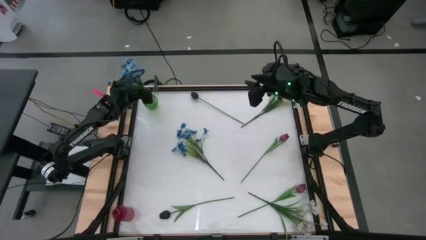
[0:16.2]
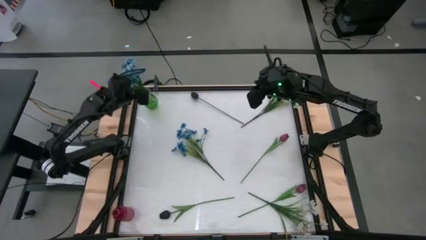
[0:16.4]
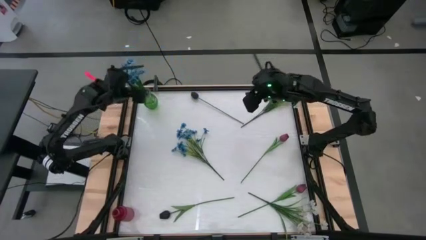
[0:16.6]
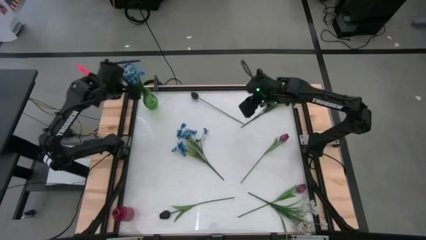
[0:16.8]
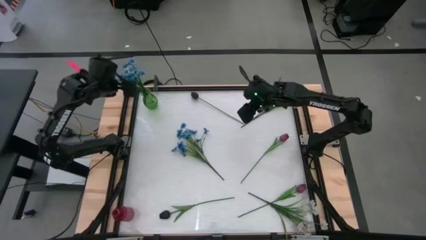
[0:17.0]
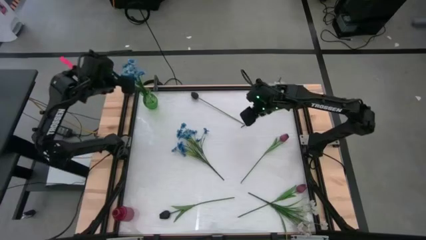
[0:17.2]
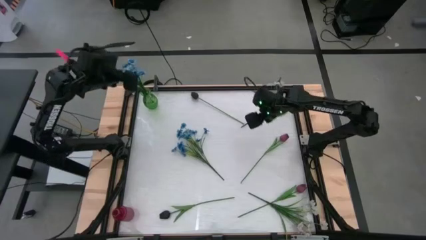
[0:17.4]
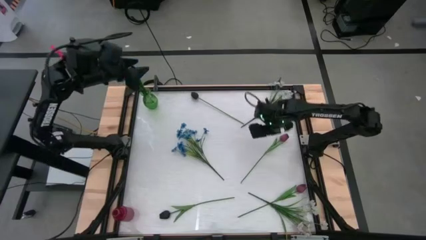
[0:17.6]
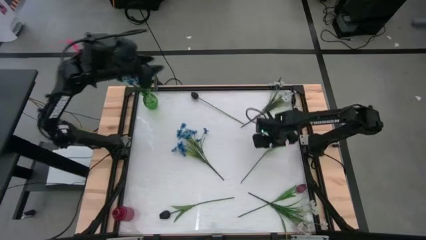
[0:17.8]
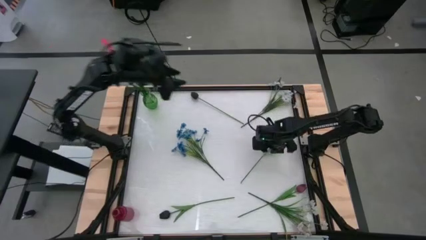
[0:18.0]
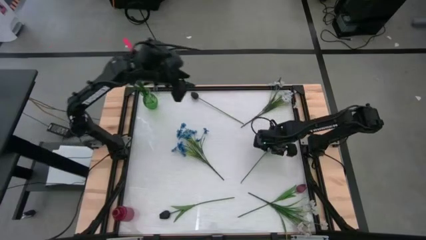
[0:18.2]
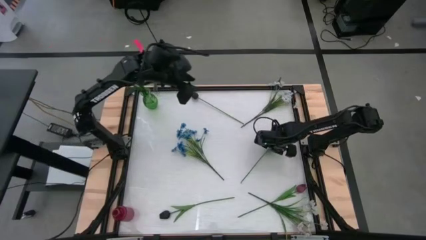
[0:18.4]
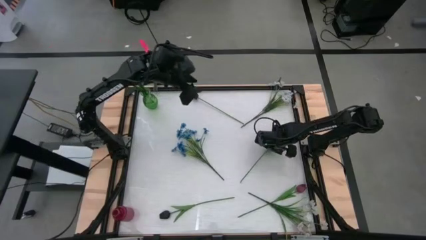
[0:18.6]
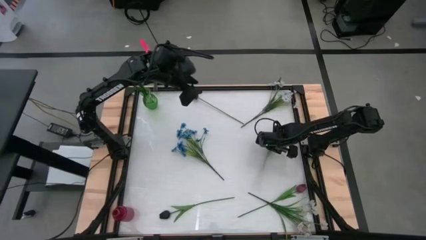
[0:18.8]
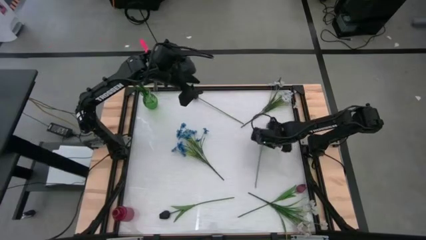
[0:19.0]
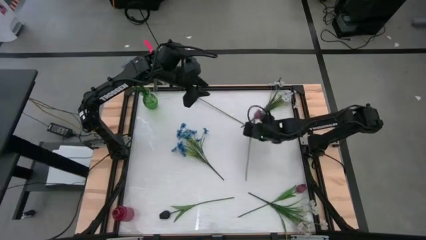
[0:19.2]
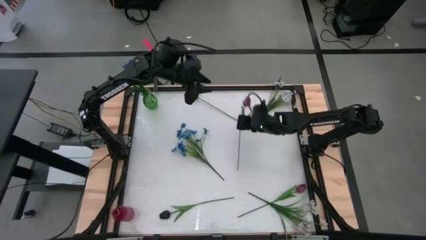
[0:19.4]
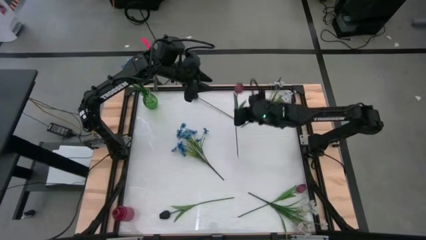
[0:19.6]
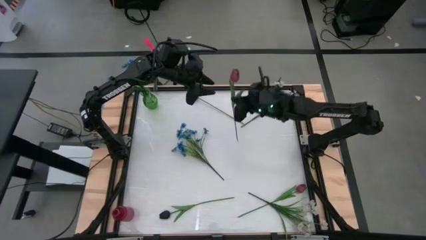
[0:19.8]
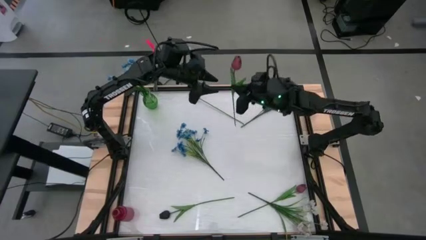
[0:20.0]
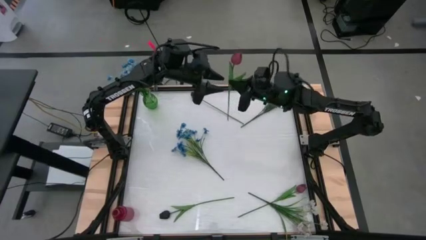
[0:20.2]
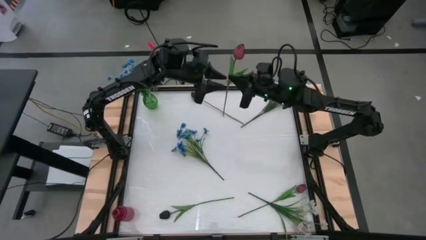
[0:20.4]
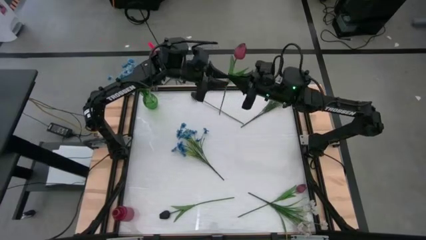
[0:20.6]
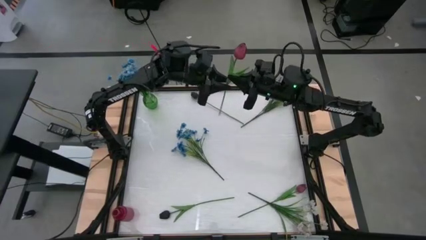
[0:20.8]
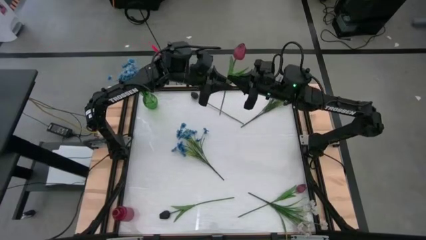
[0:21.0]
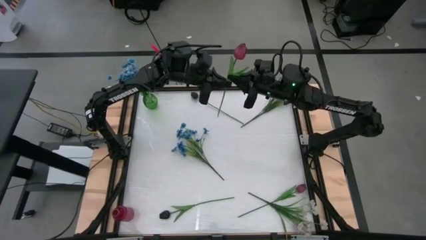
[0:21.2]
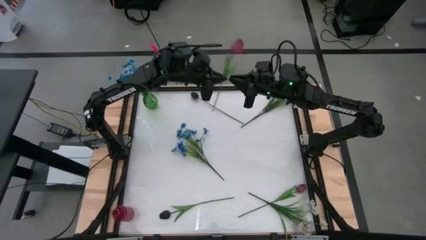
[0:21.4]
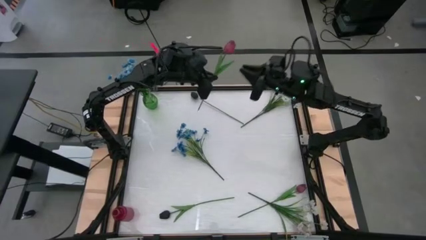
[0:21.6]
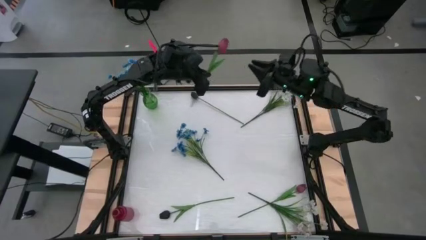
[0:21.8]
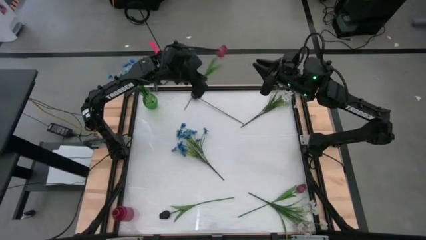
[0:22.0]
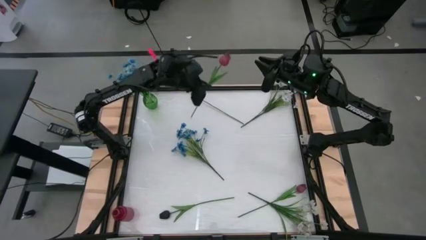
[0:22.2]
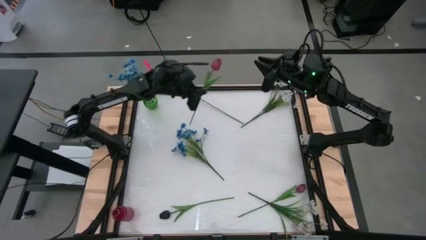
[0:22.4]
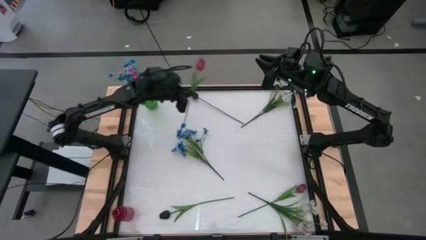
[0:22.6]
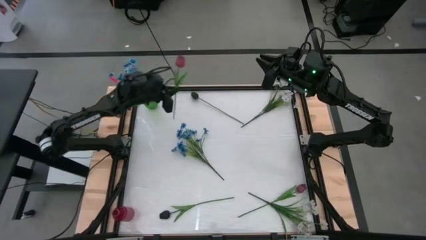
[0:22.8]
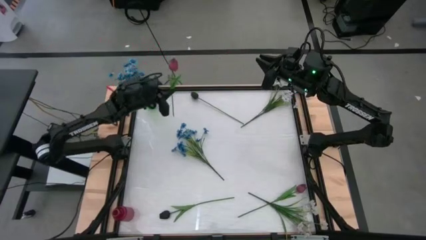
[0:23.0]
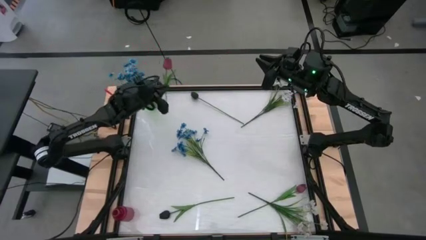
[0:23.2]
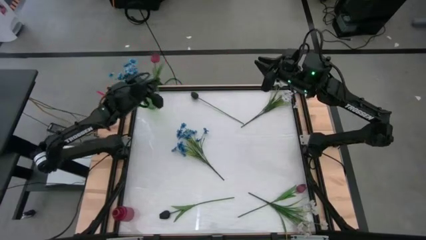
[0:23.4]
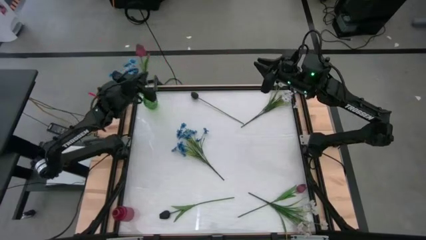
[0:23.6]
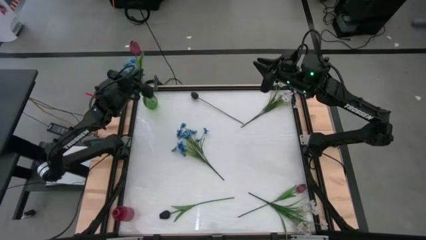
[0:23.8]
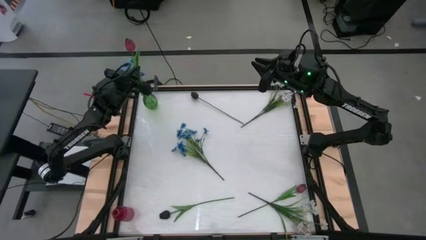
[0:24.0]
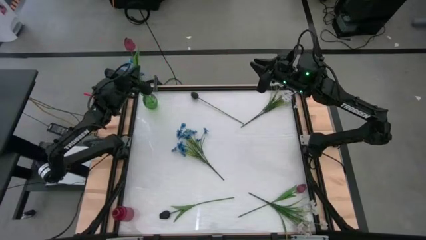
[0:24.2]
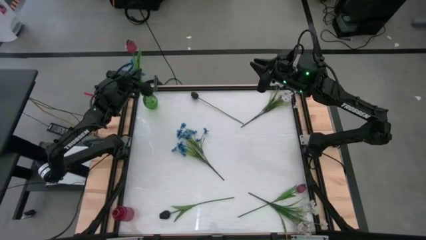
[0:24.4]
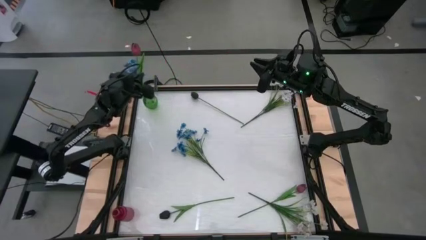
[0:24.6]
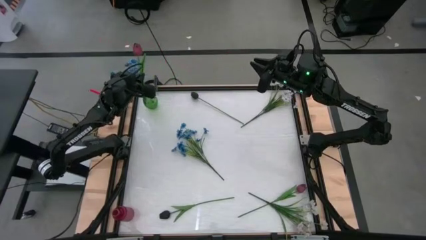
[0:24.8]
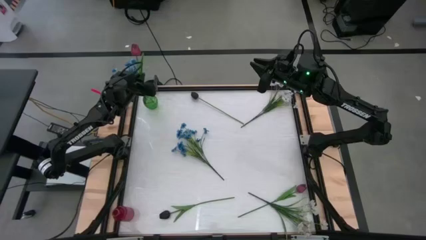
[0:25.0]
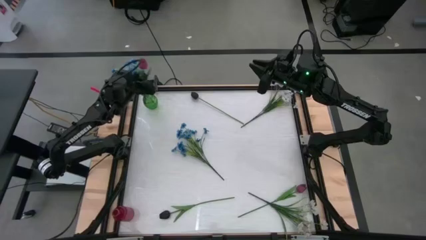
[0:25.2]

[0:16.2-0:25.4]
Task: Sort flowers into vase by color
Put the top red tulip into the green vase

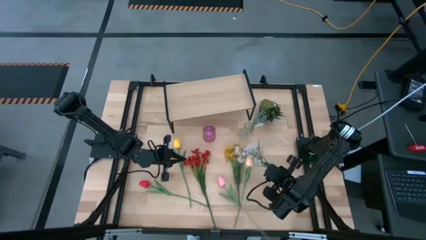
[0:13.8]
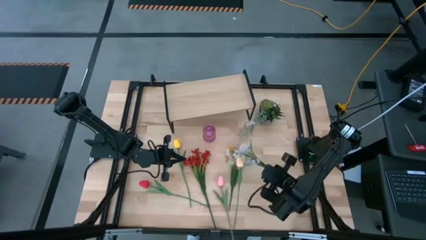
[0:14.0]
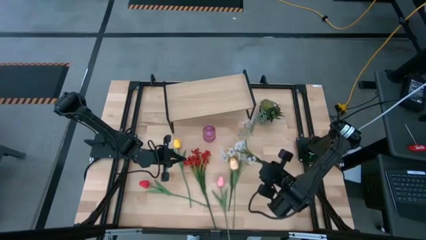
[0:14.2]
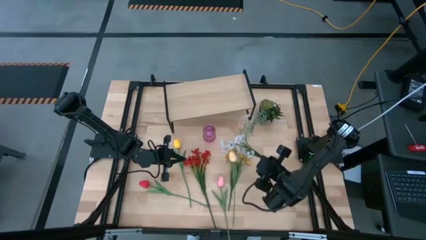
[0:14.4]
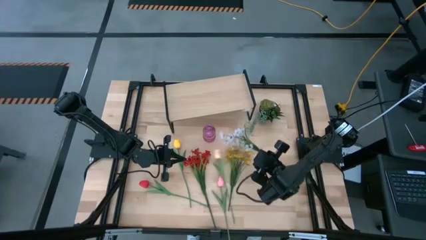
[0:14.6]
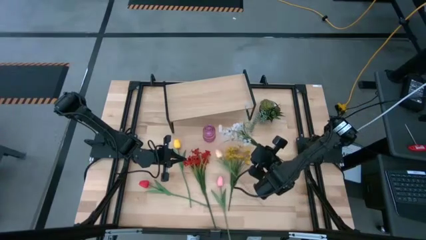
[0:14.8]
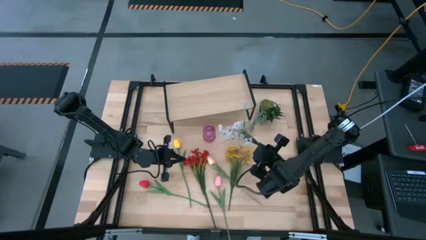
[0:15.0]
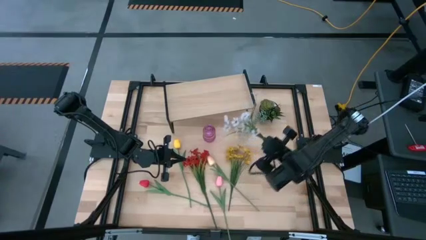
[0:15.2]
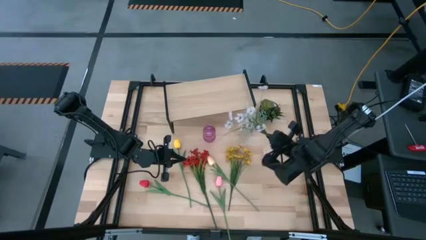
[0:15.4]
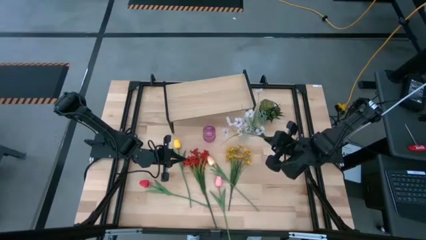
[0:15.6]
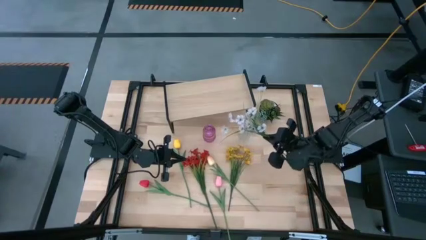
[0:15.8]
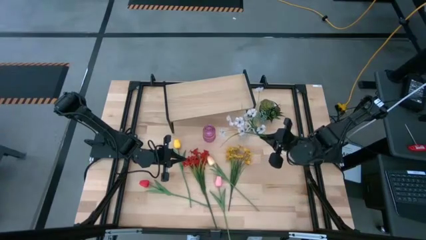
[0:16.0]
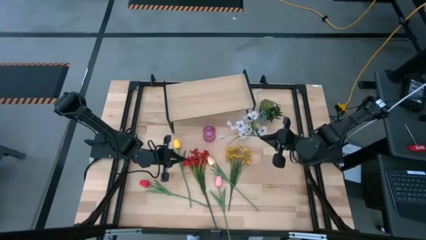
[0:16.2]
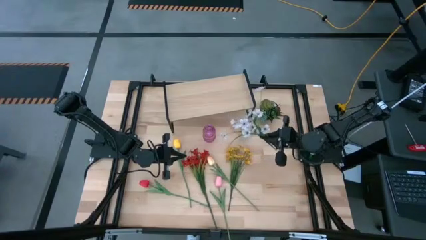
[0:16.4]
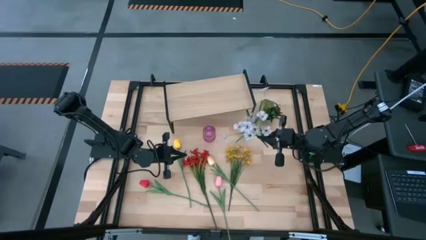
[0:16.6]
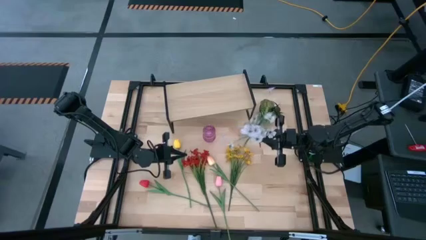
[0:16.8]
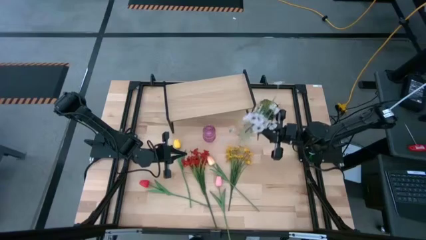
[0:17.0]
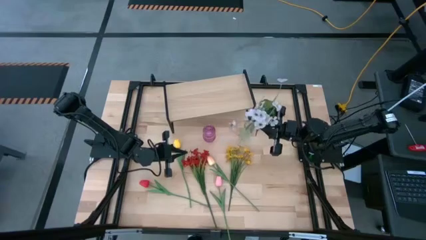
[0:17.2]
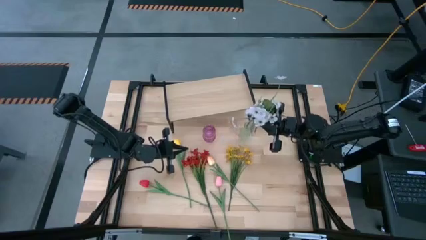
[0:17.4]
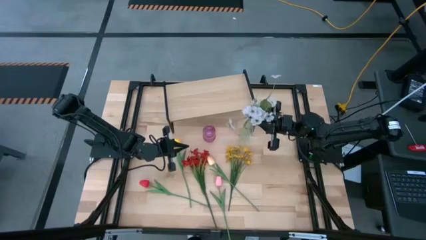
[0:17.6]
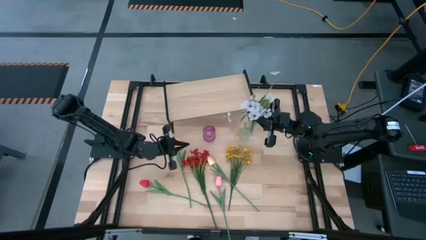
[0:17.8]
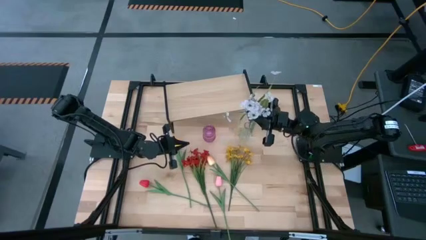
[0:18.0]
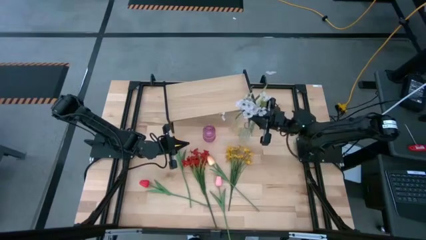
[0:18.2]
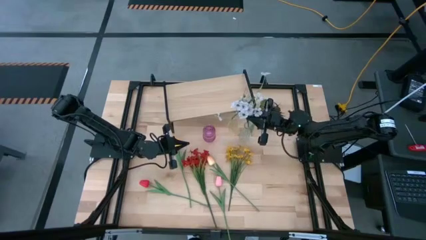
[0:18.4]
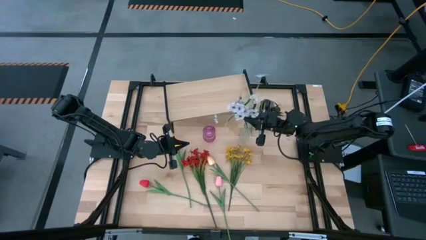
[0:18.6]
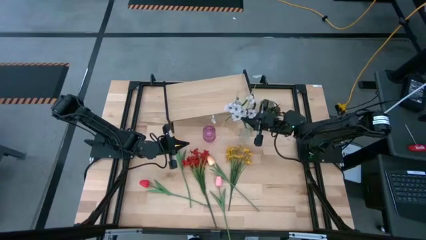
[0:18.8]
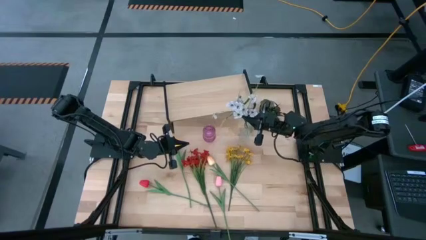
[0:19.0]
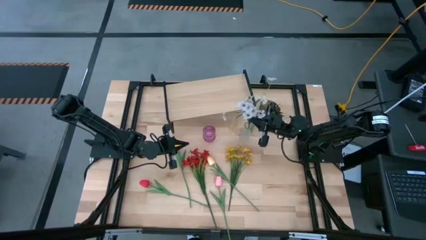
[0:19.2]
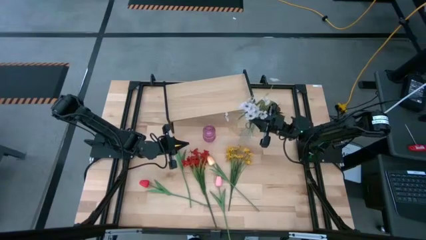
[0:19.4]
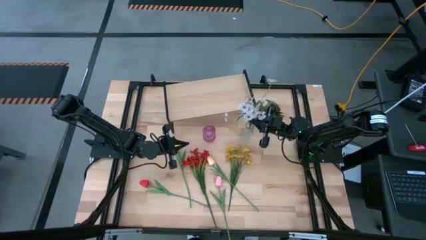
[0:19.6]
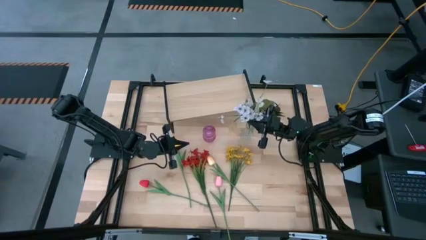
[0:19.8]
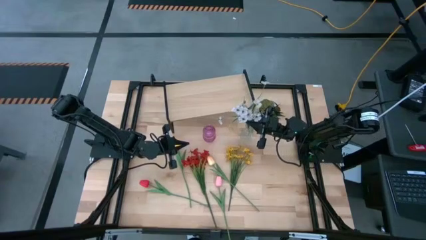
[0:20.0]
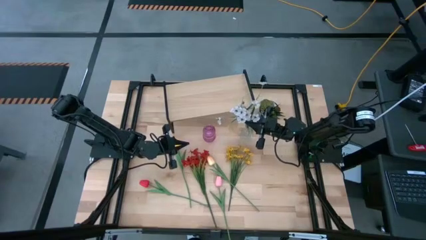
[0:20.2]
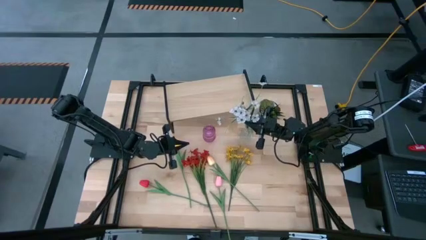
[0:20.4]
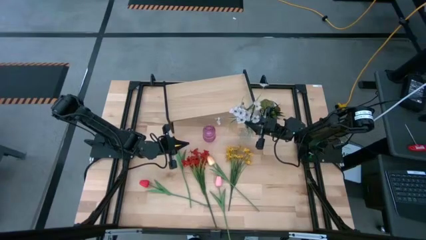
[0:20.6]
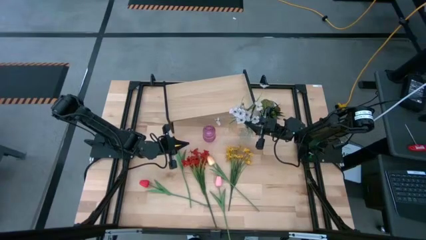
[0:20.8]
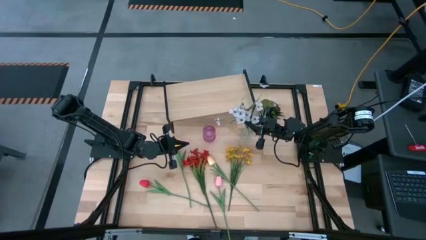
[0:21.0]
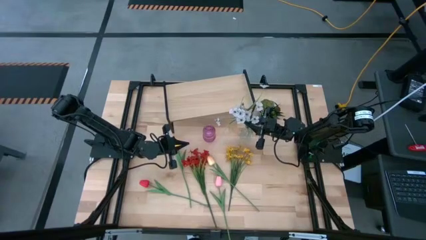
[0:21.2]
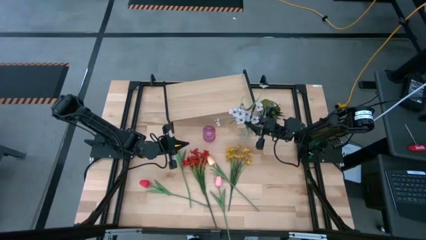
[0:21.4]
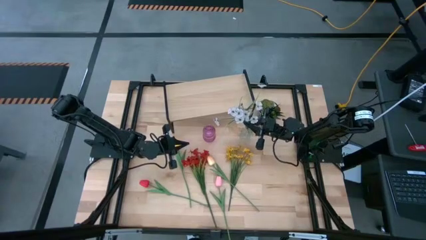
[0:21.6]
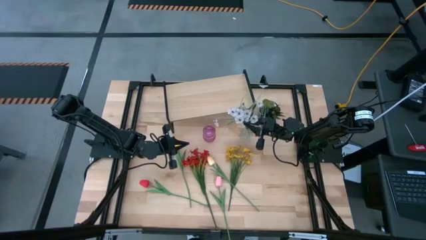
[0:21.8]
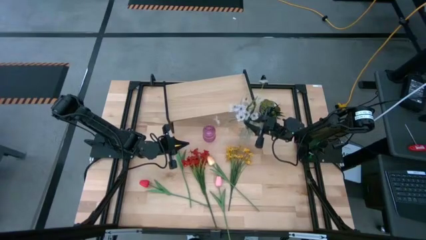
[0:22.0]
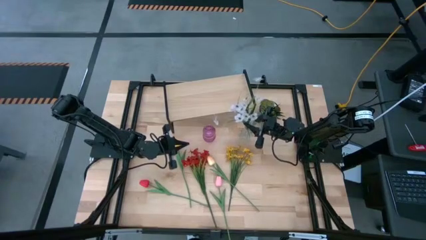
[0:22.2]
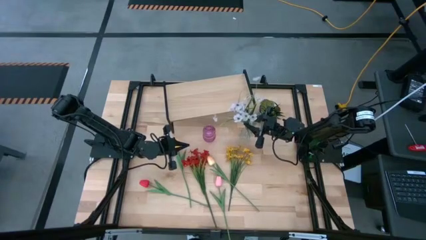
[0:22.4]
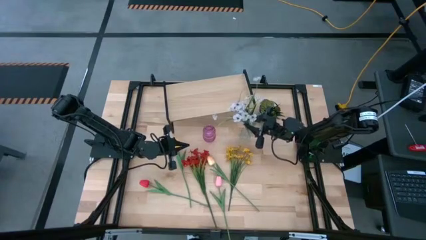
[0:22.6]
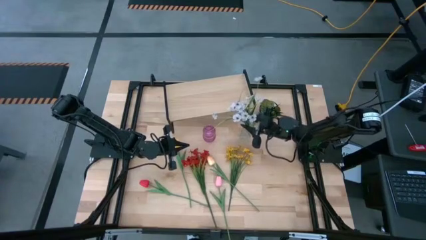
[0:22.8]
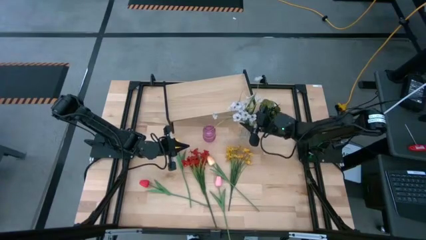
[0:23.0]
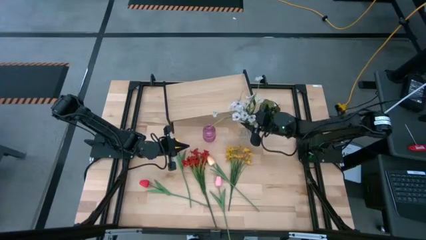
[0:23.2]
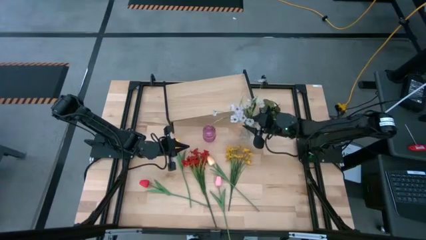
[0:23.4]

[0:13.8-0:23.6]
Task: Pick and place flowers into a vace then onto a shelf
Put the white flowers into the transparent vase
